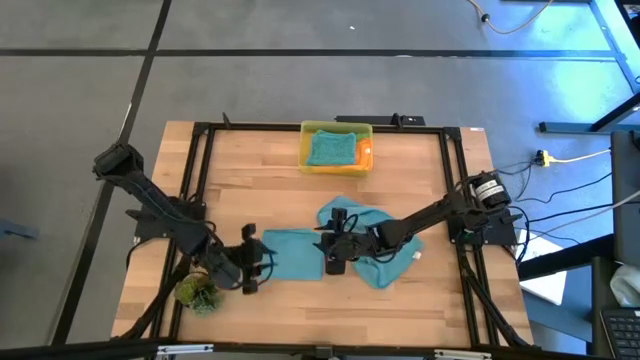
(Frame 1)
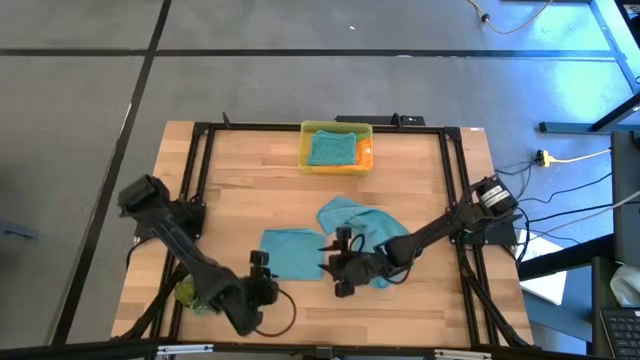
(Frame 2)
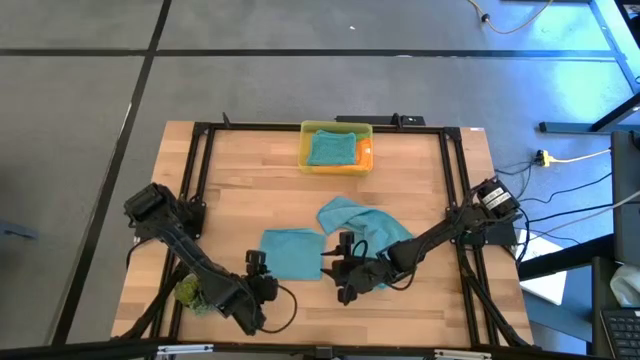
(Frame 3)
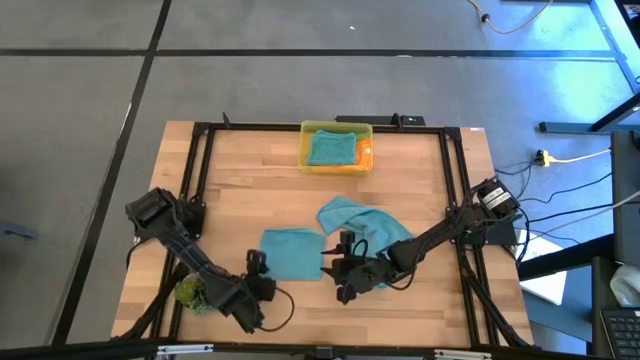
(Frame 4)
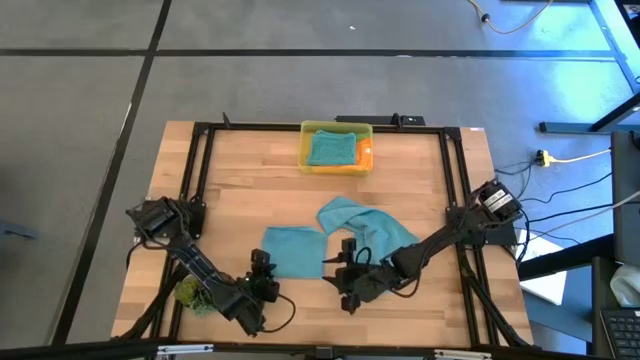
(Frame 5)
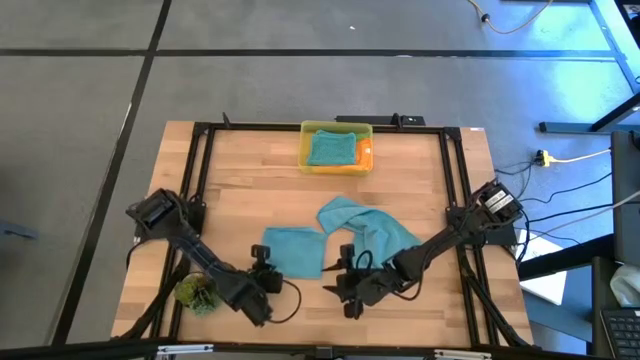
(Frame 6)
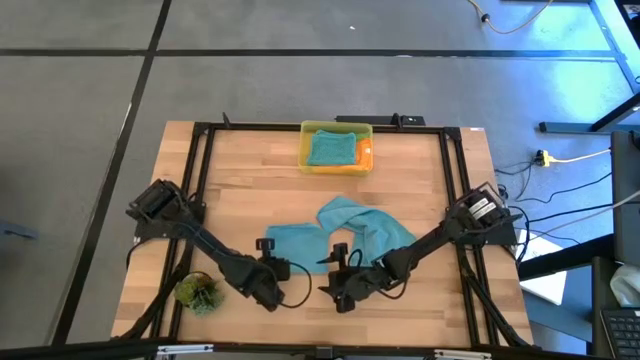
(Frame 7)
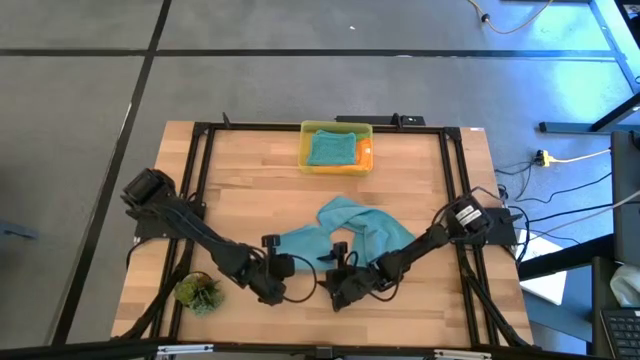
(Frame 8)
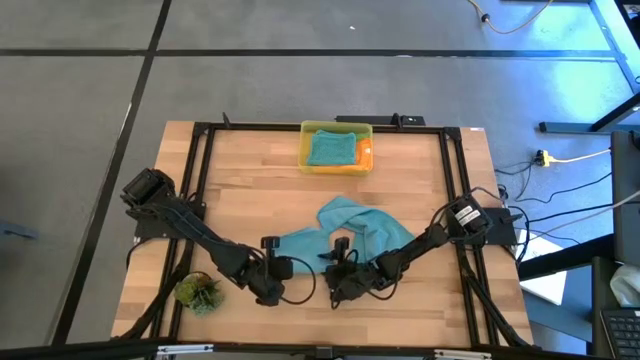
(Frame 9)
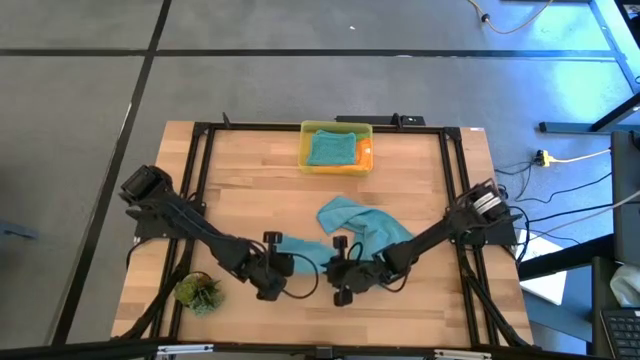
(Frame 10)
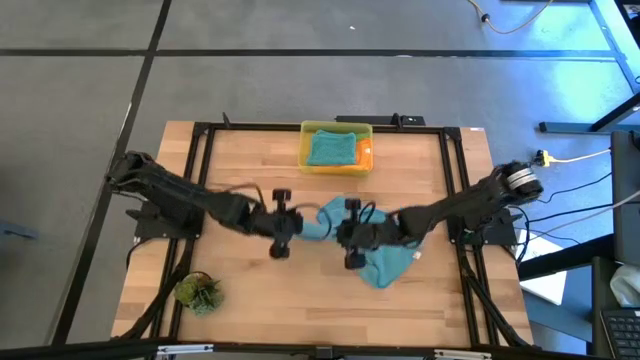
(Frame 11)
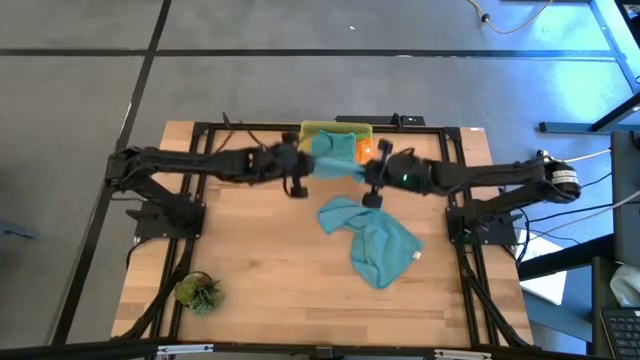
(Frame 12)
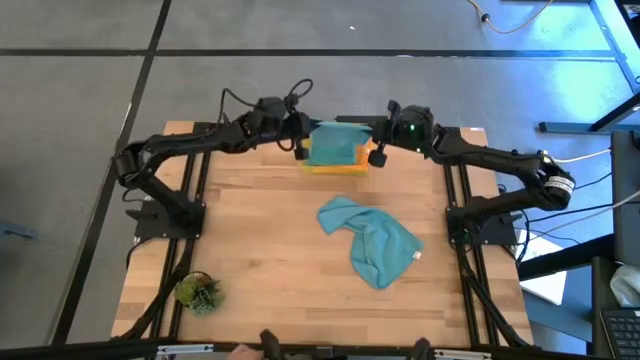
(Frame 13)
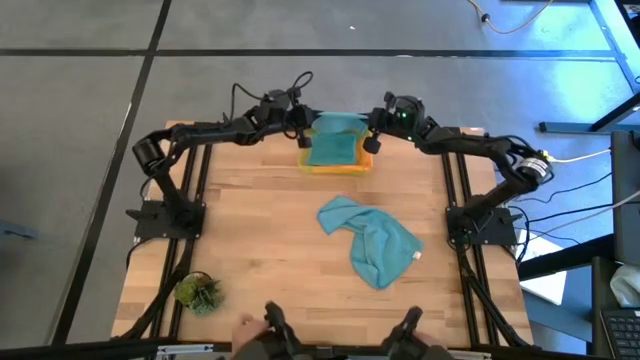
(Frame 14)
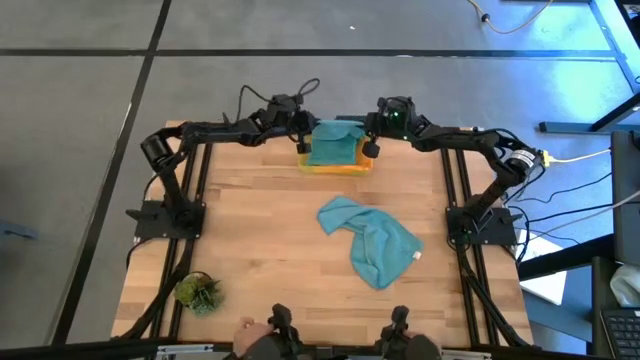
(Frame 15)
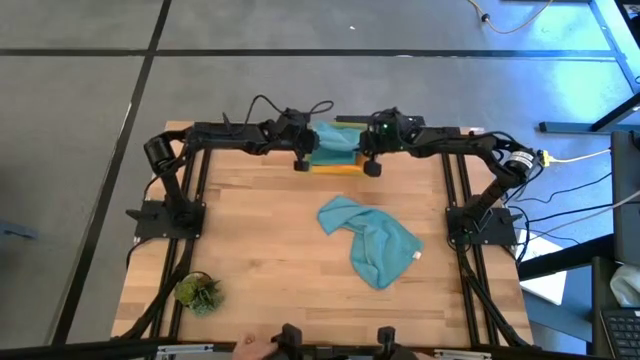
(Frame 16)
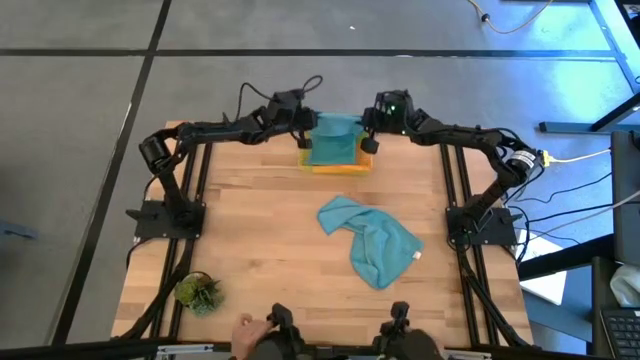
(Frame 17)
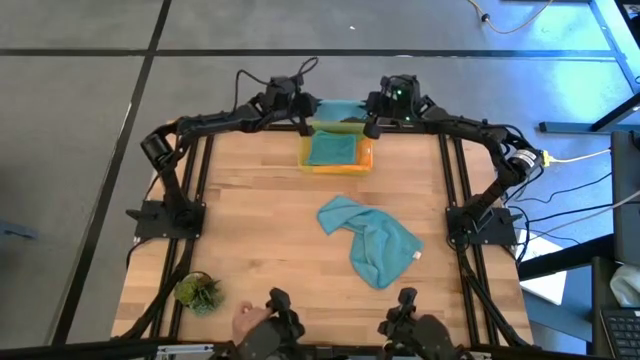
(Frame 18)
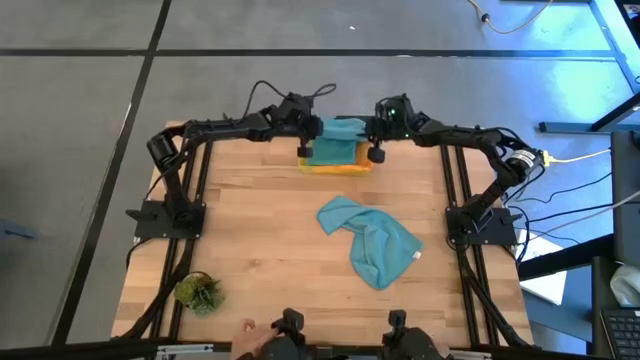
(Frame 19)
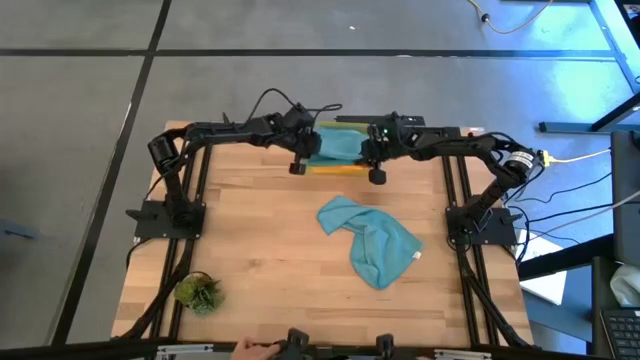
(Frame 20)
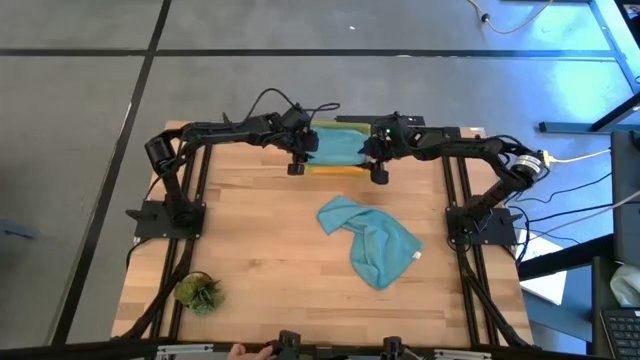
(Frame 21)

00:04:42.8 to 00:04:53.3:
Task: Fold microfiber towels
Put the top blue microfiber cloth into the yellow bin

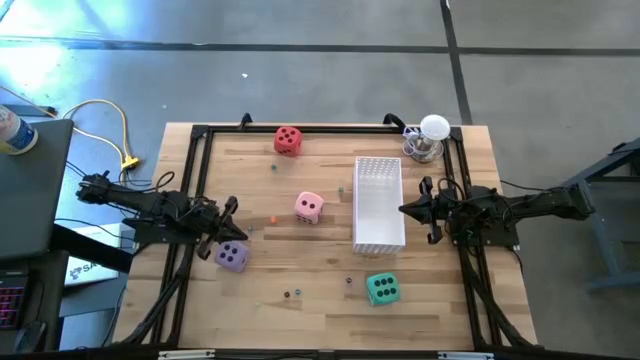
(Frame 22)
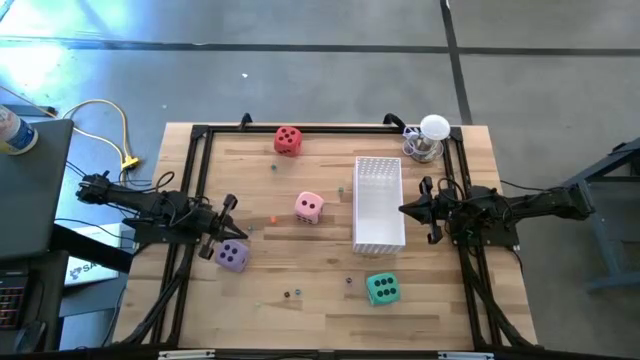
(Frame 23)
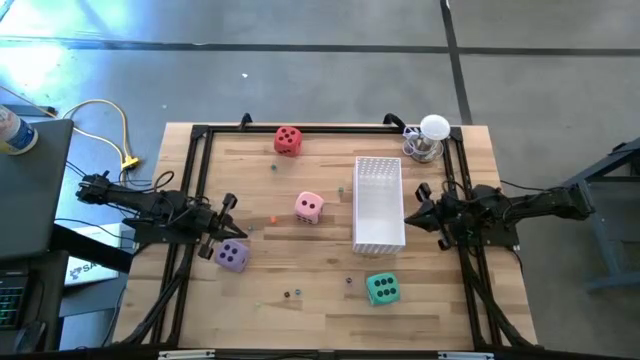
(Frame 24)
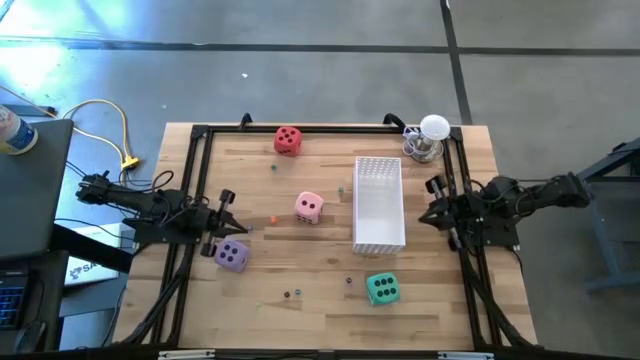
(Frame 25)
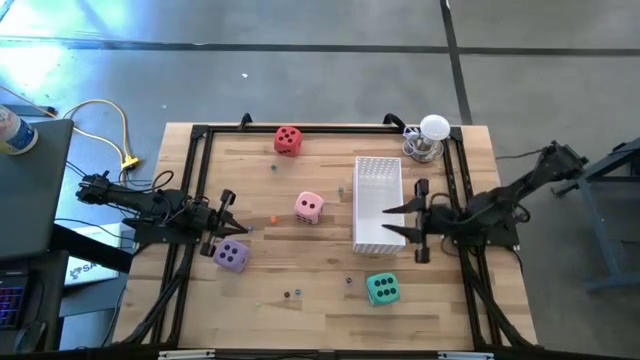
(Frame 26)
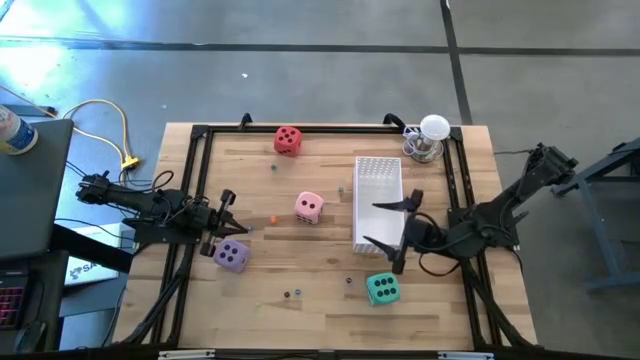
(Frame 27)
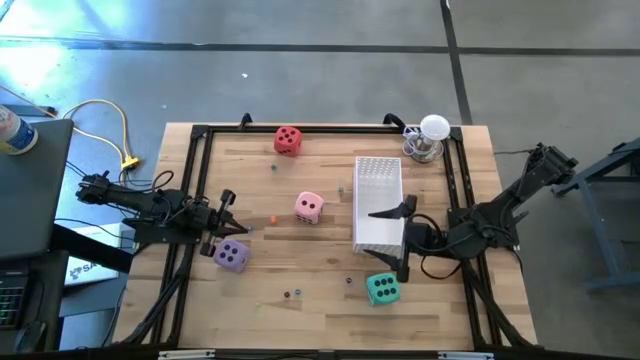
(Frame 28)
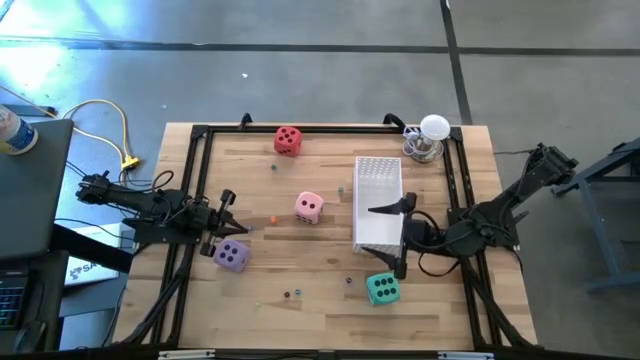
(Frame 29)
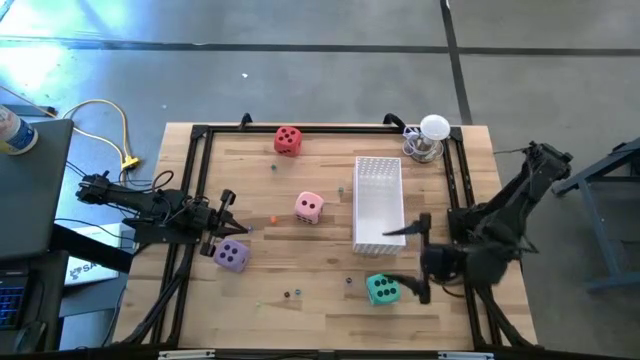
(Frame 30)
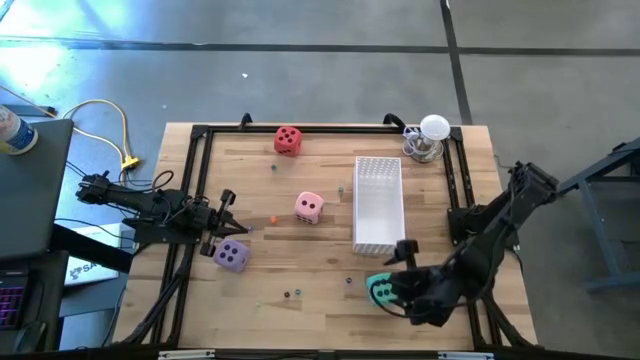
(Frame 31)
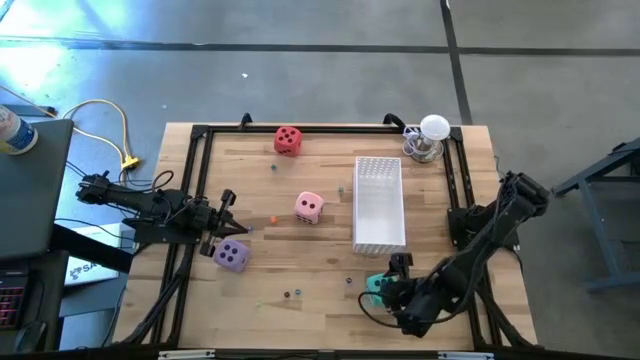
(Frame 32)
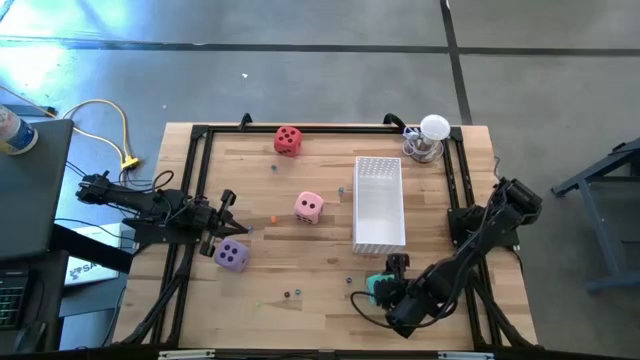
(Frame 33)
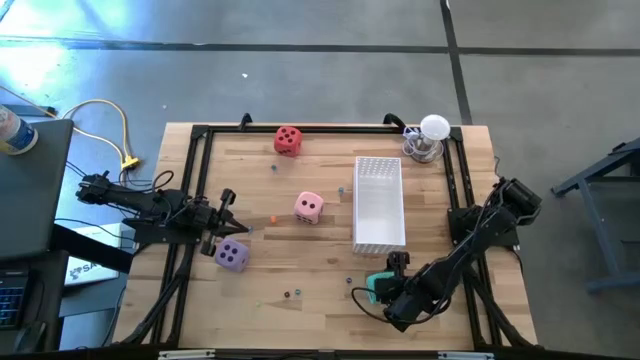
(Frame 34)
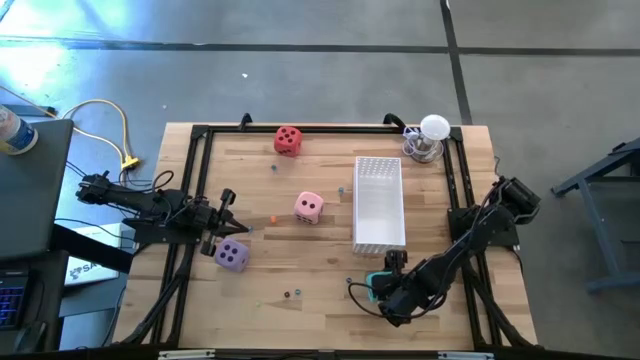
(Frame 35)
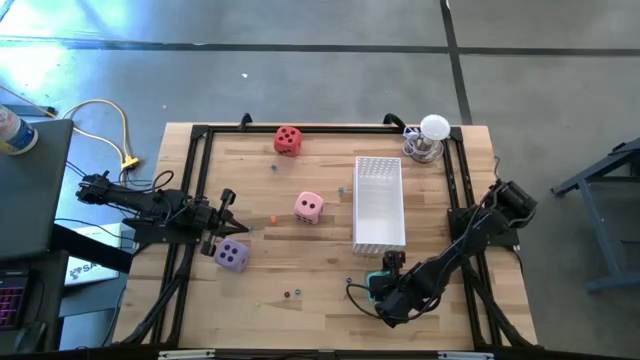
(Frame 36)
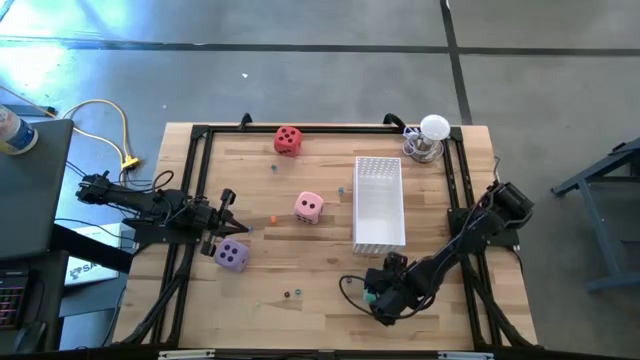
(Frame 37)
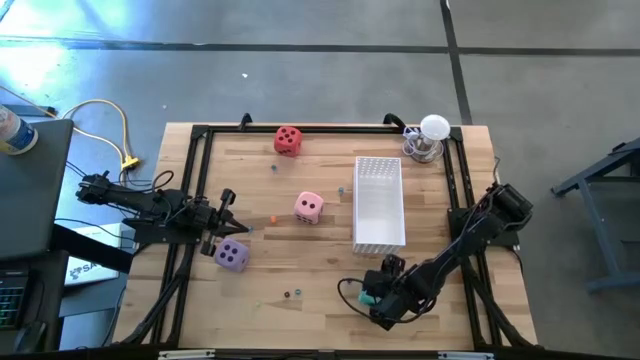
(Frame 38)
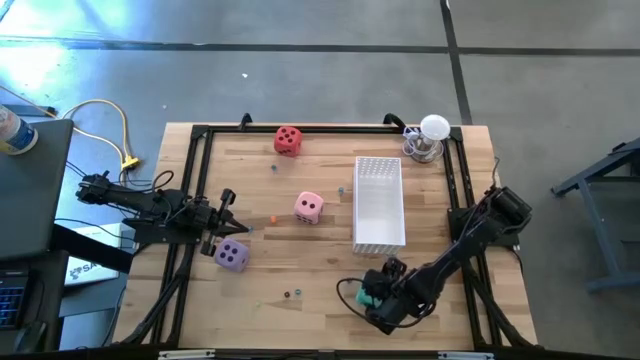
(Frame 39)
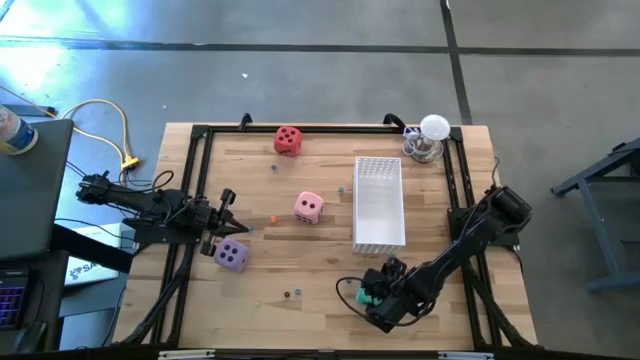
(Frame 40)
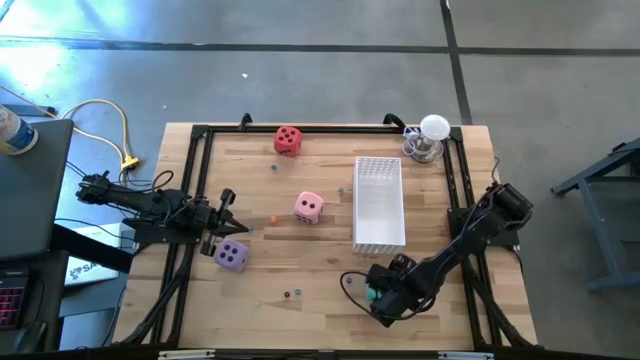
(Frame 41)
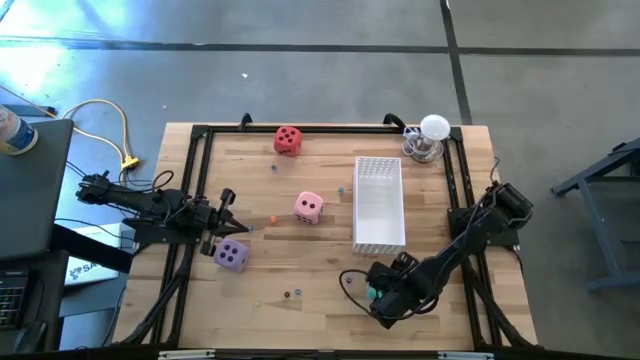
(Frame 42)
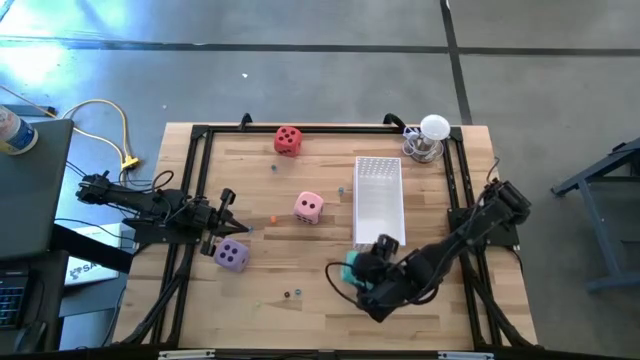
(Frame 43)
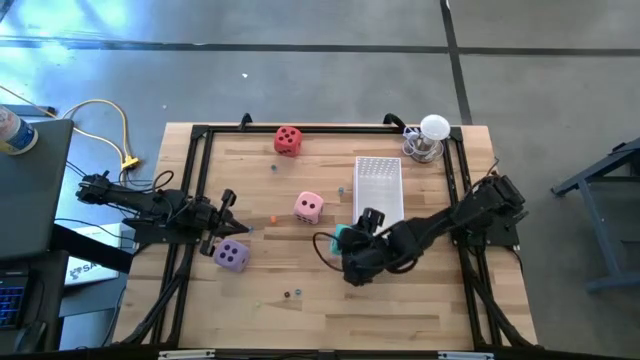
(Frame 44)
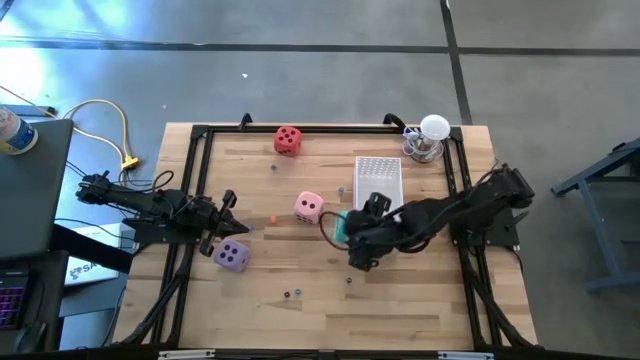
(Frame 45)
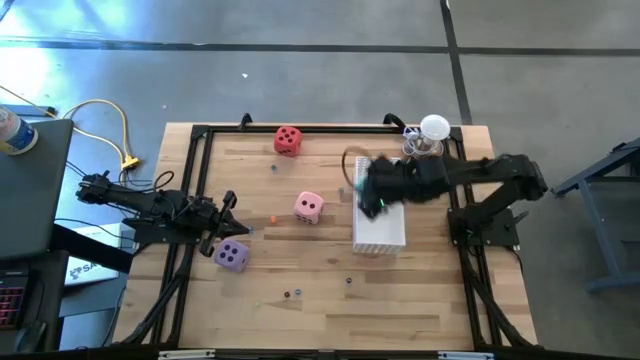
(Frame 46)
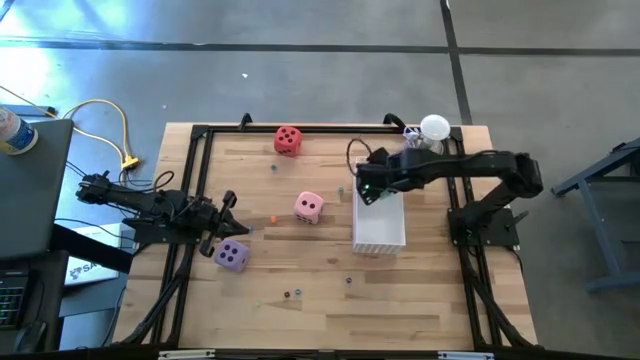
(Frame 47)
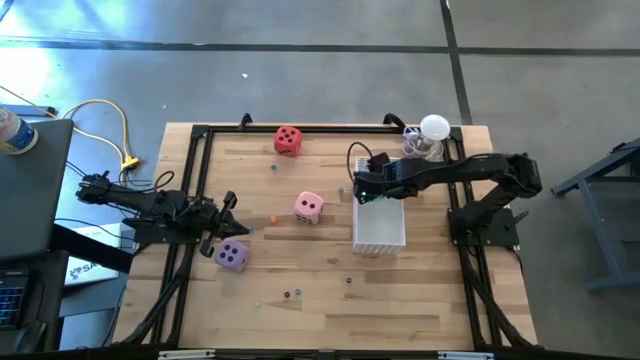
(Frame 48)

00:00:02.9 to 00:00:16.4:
Task: Pick & Place Dice
Put the light blue die into the white bin
